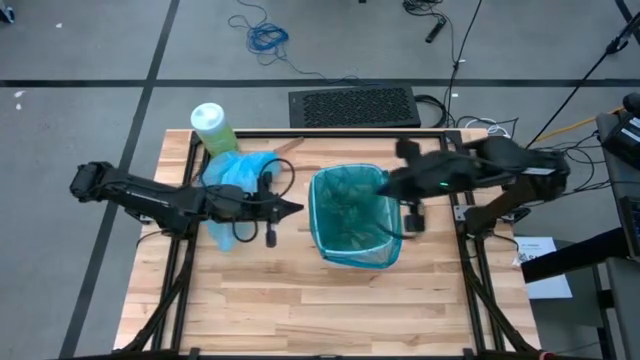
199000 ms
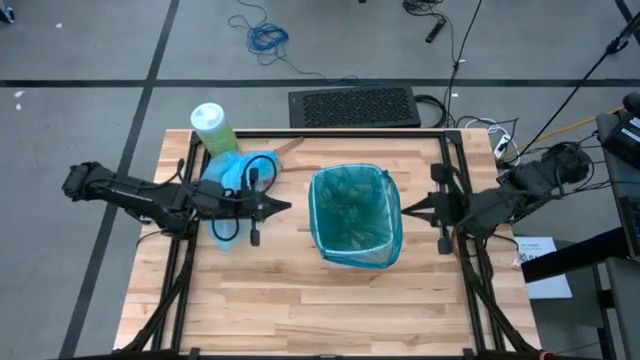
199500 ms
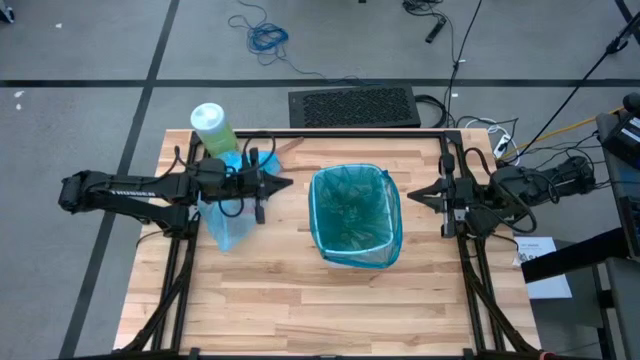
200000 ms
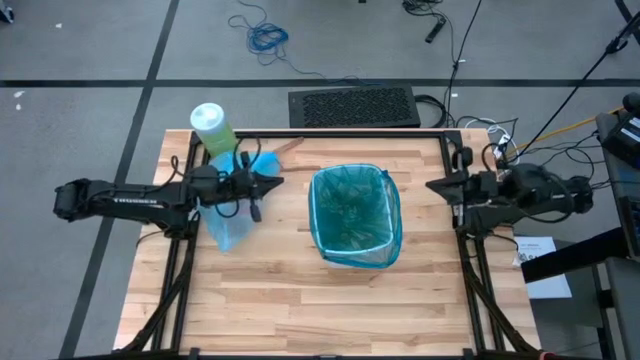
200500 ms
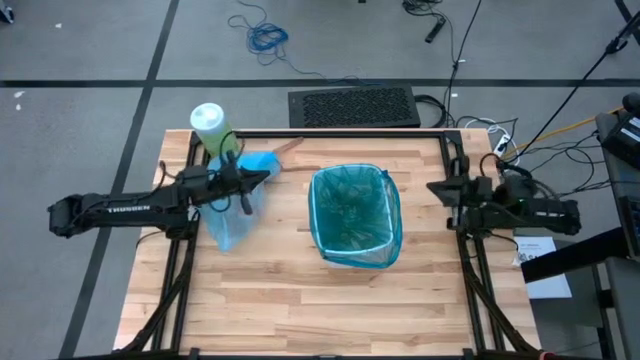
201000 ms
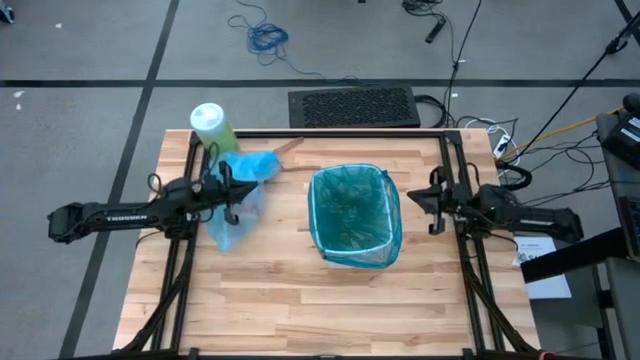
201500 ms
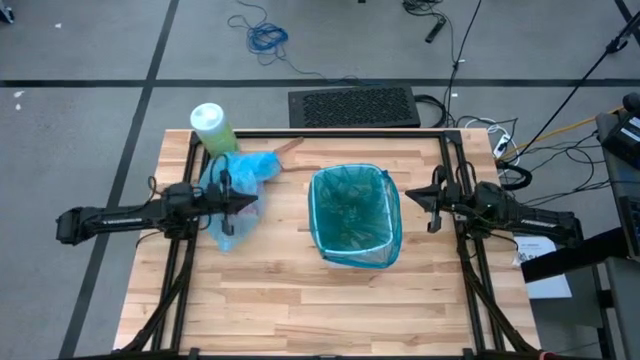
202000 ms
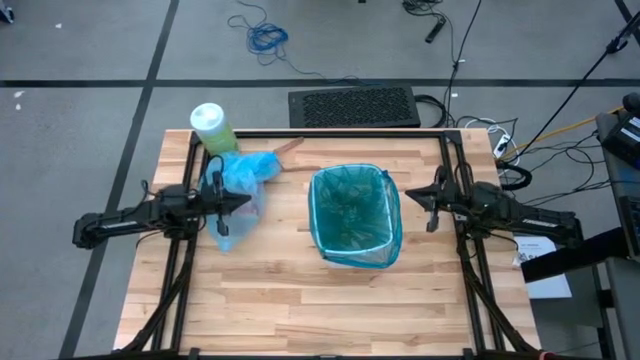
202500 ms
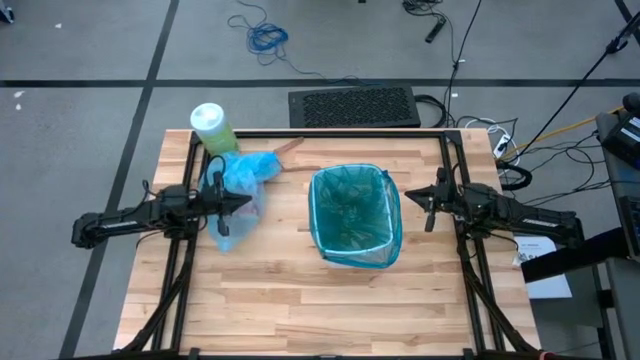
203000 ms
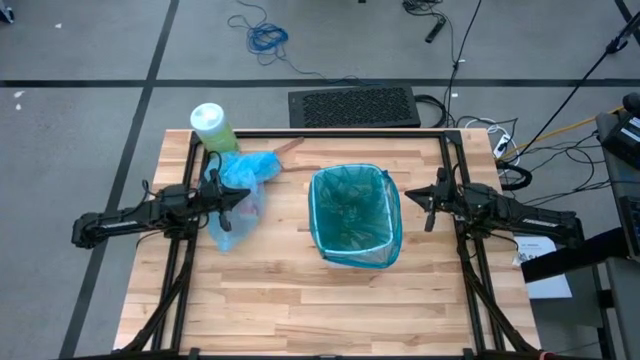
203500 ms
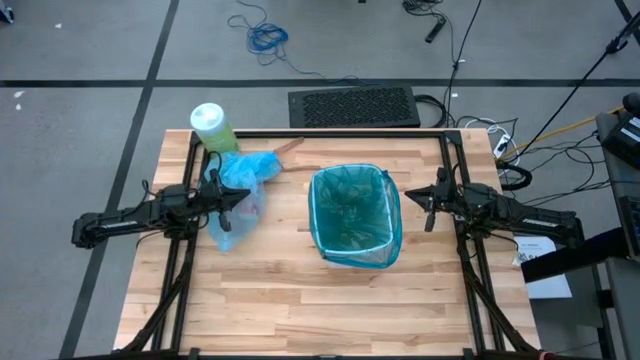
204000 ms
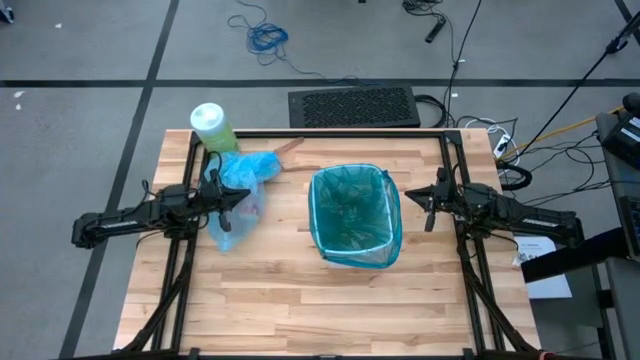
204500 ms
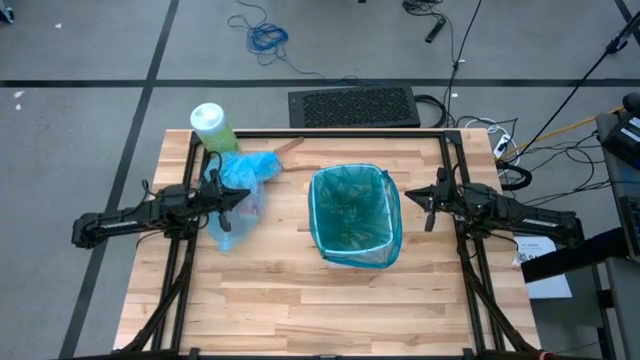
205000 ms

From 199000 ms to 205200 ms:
Task: place trash/remove bag and relplace
Return to Home Position

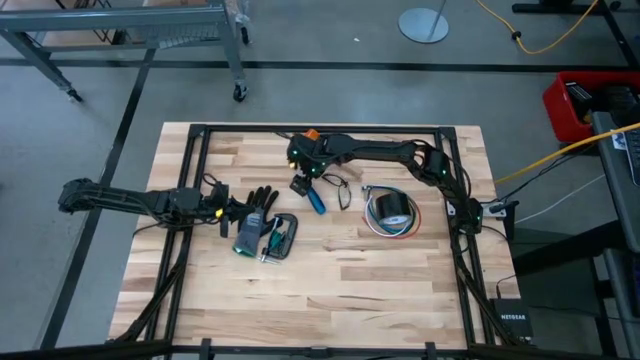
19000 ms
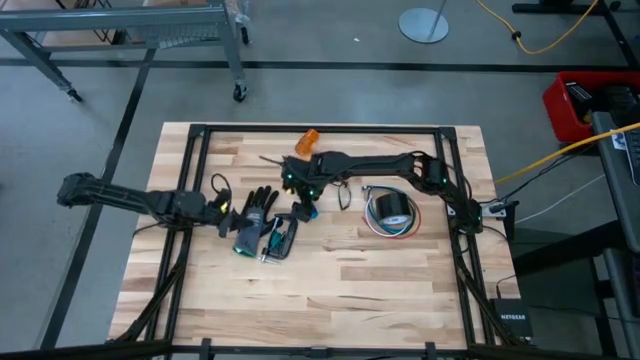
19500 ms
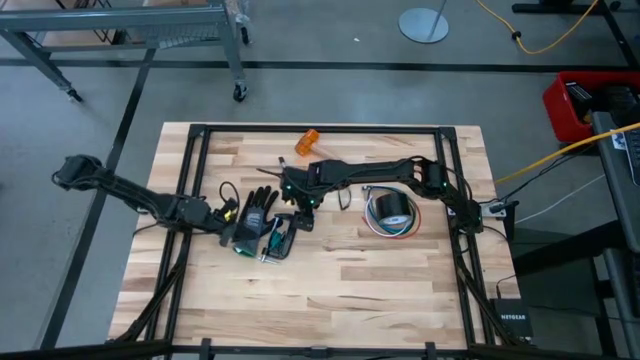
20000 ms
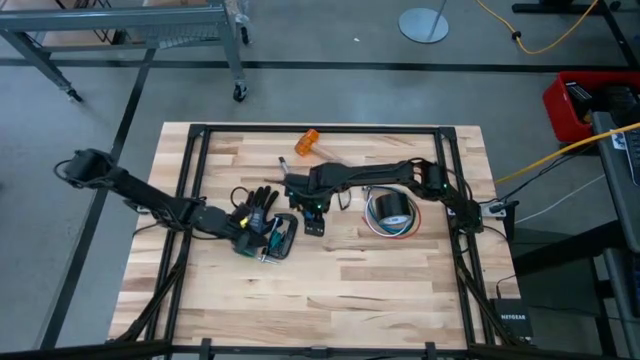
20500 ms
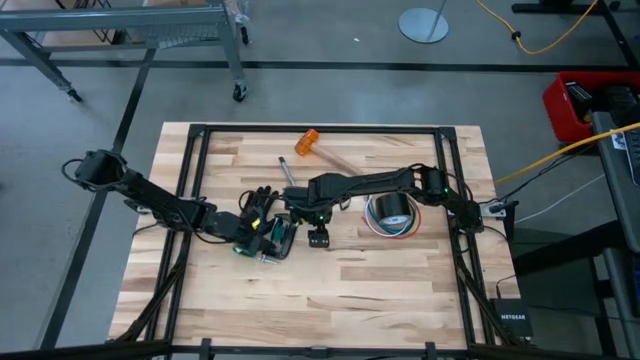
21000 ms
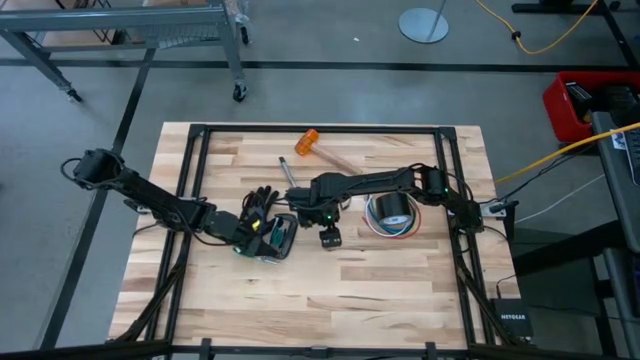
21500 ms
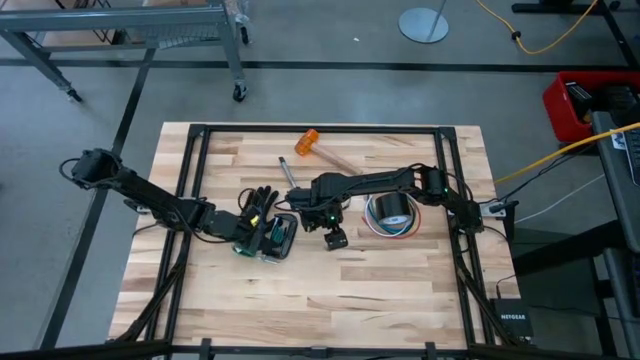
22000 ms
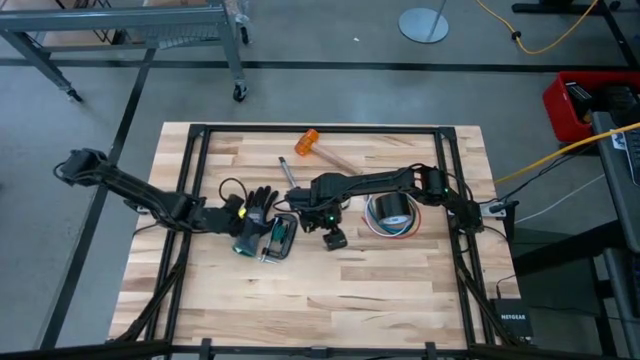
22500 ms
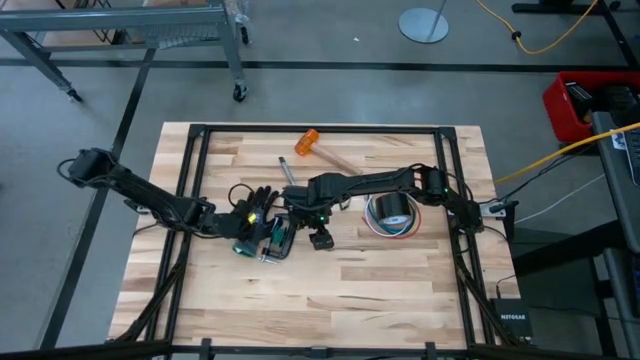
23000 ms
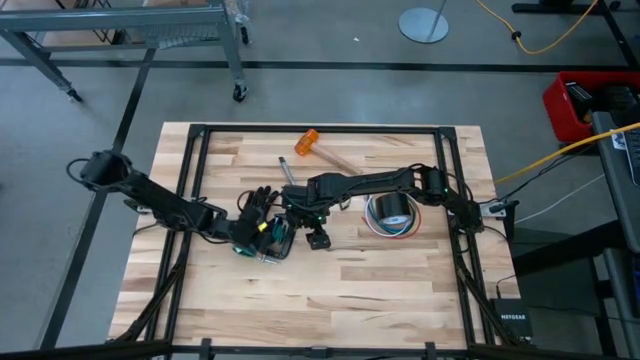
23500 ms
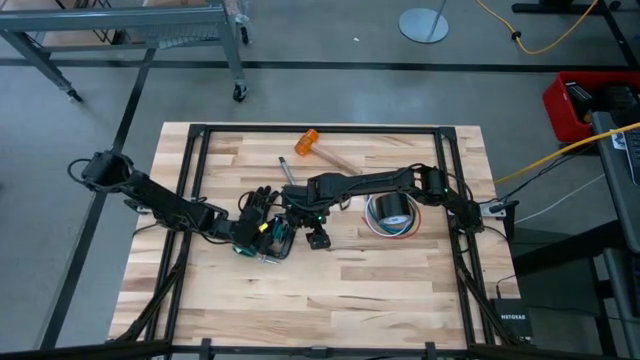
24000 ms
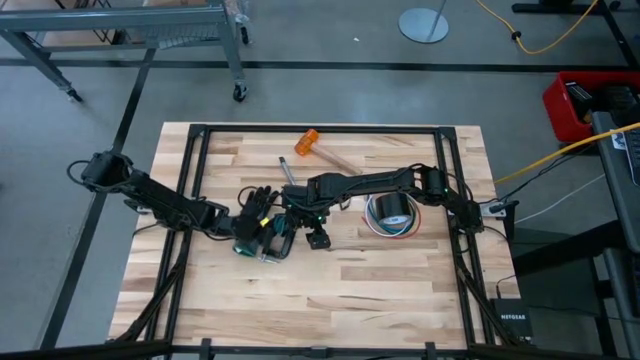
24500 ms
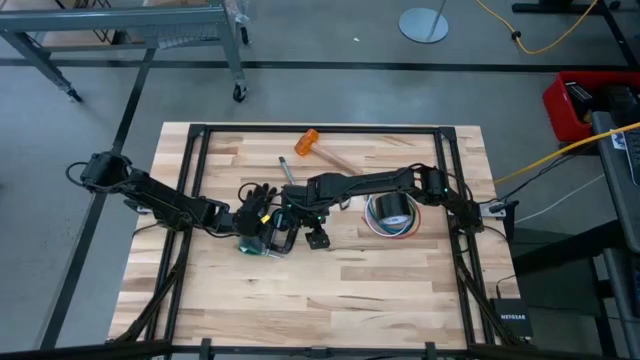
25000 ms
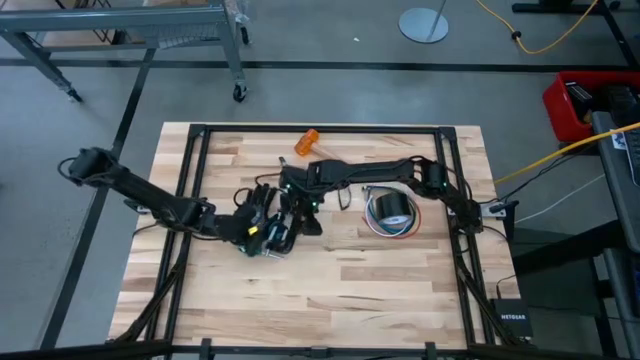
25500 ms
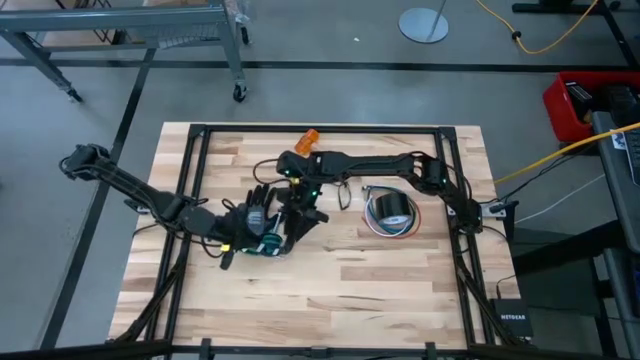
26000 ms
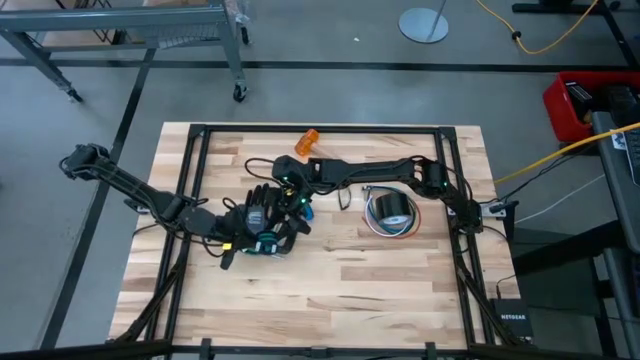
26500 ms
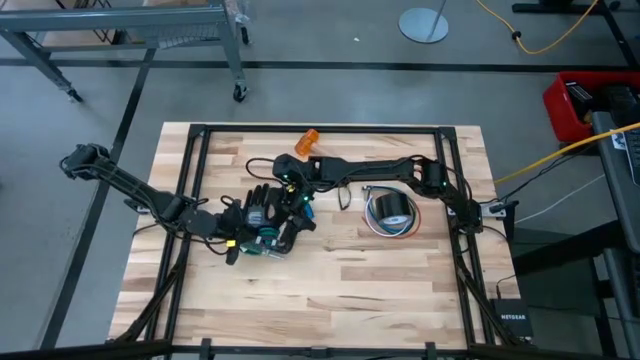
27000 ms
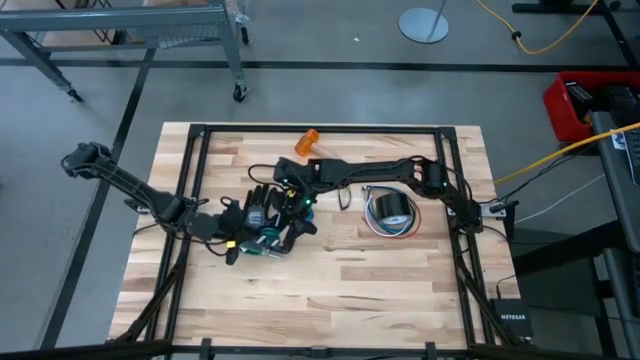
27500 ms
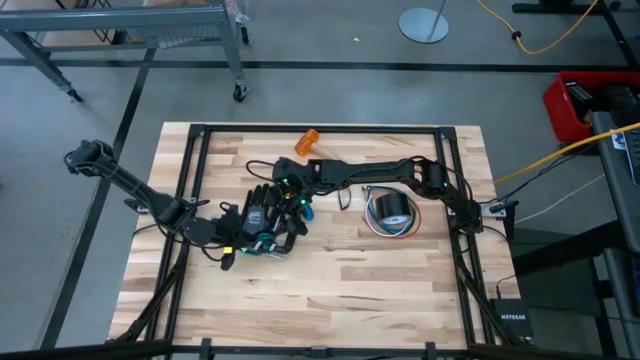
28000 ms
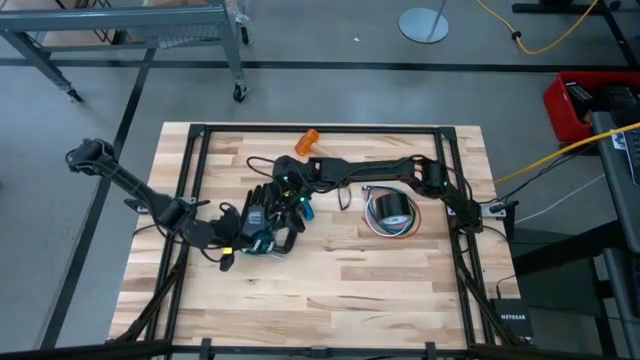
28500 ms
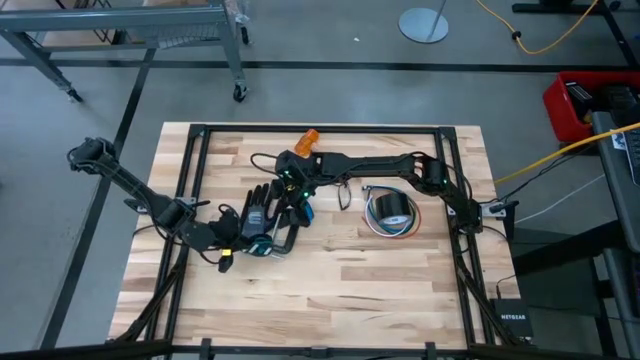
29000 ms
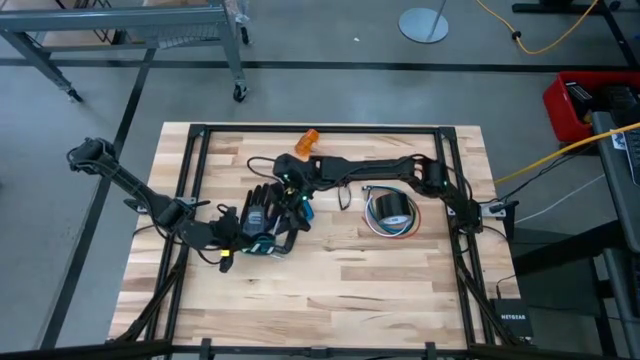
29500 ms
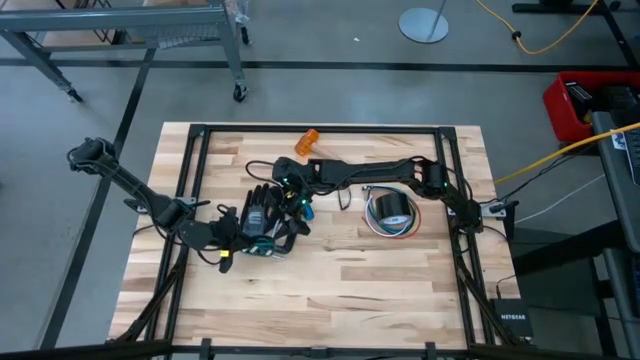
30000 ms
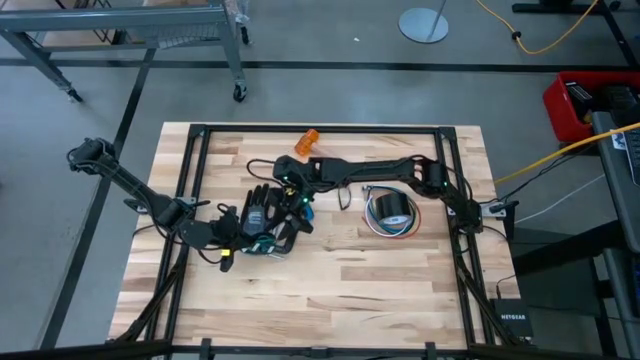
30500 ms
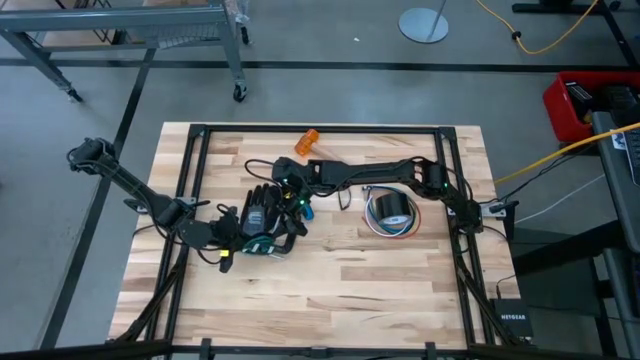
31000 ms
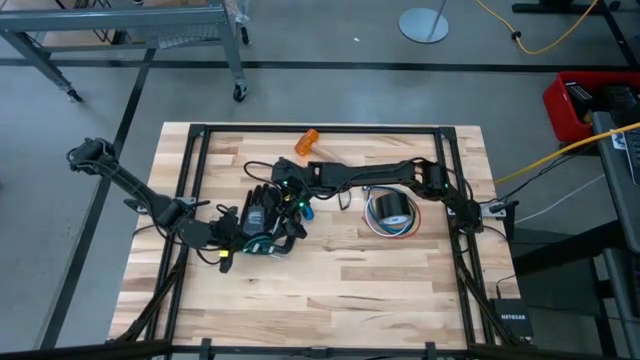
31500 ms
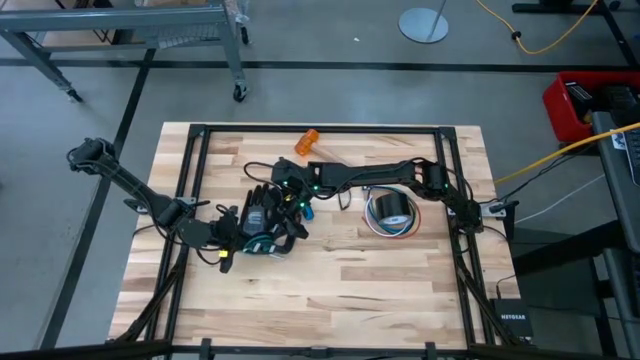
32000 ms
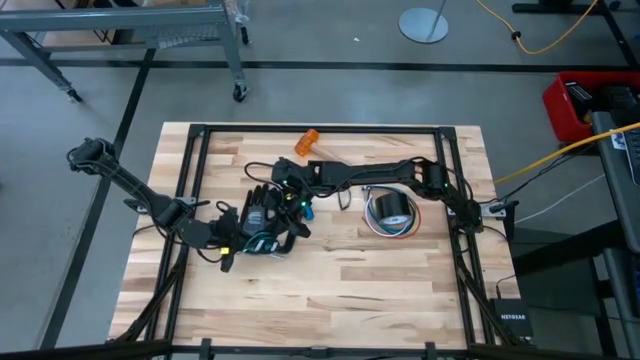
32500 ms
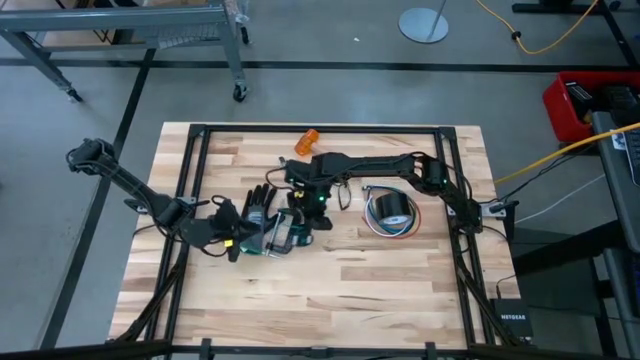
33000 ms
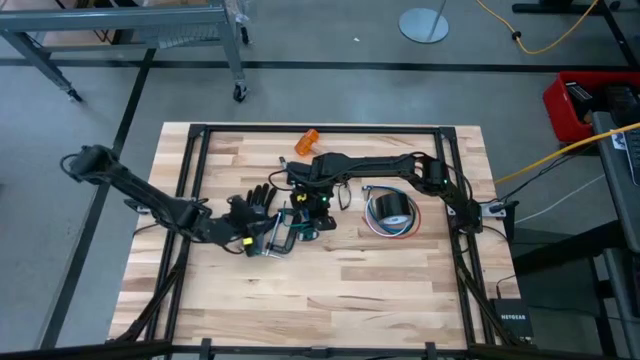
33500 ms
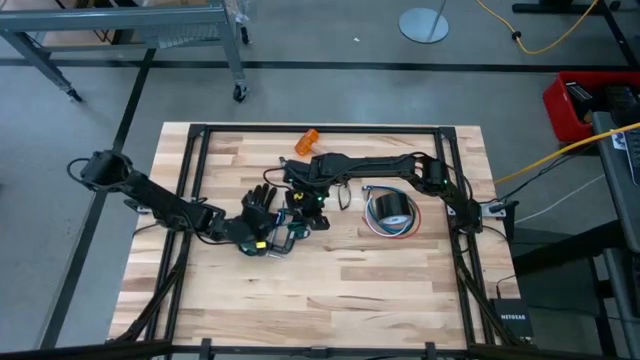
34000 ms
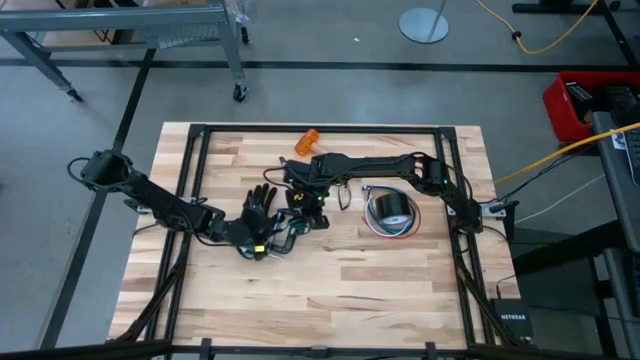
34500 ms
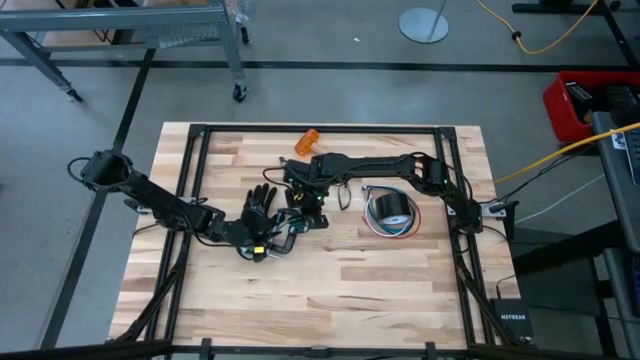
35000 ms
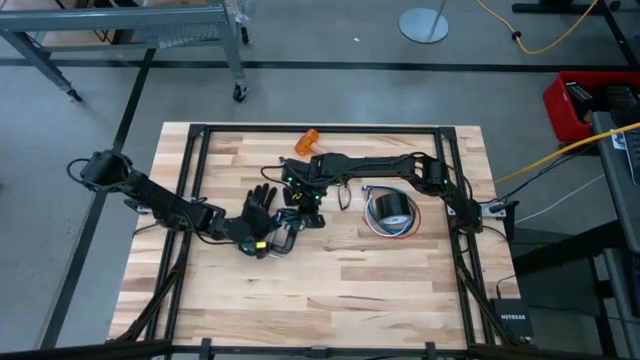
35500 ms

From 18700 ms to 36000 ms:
Task: Coil cords
Uncoil the green wire from the spool
